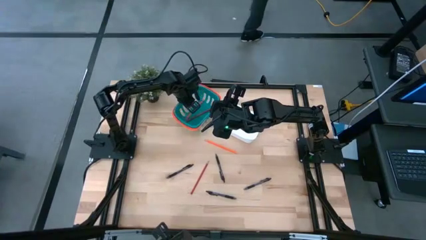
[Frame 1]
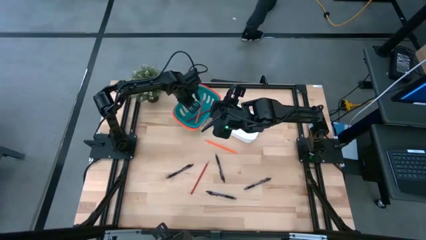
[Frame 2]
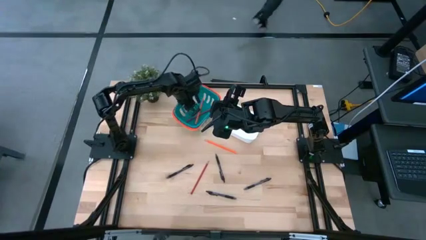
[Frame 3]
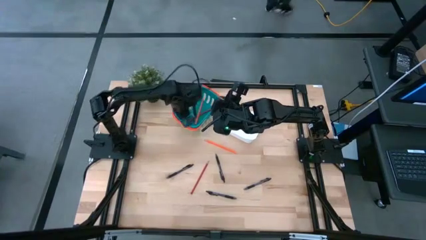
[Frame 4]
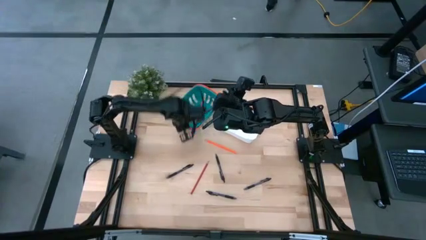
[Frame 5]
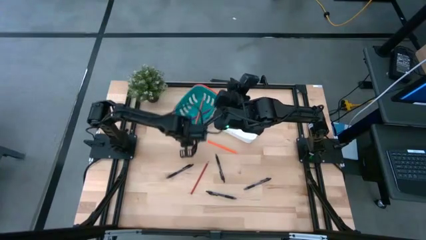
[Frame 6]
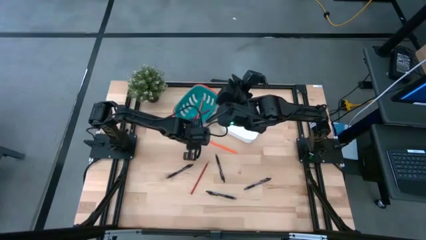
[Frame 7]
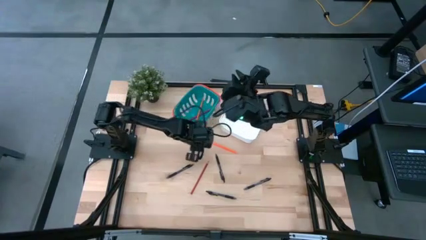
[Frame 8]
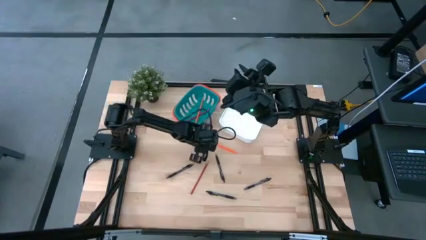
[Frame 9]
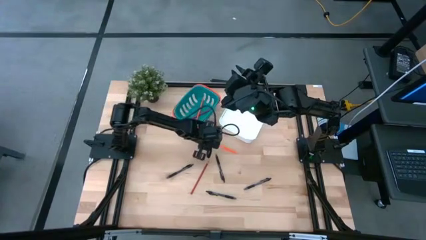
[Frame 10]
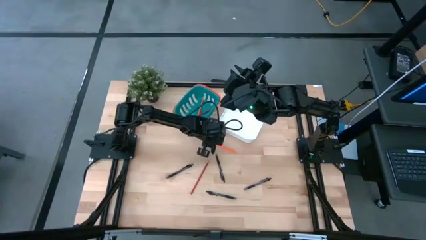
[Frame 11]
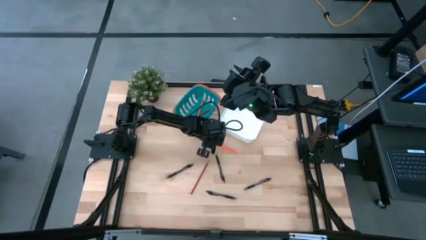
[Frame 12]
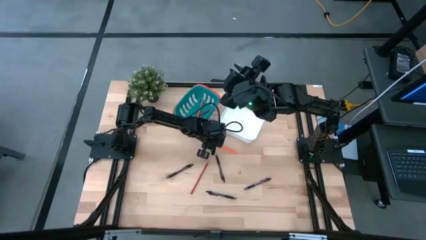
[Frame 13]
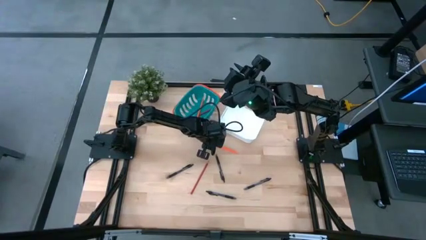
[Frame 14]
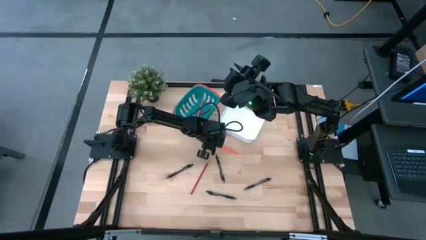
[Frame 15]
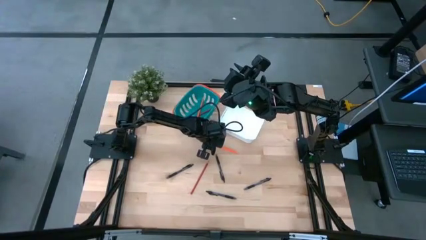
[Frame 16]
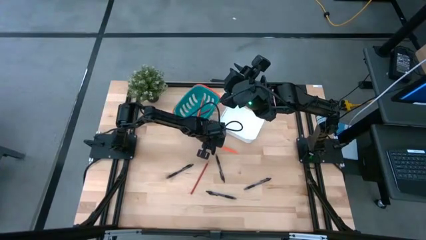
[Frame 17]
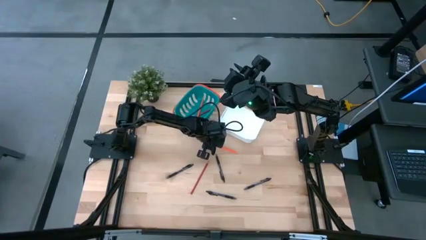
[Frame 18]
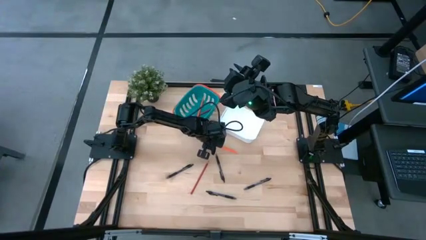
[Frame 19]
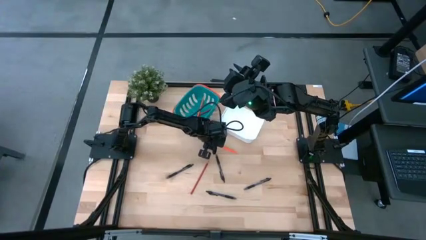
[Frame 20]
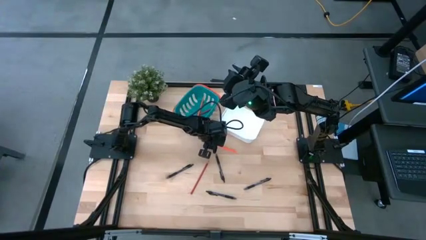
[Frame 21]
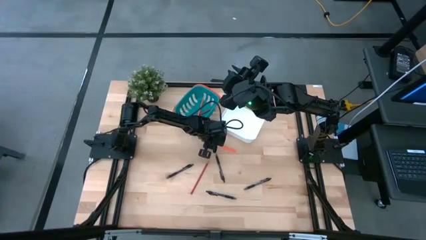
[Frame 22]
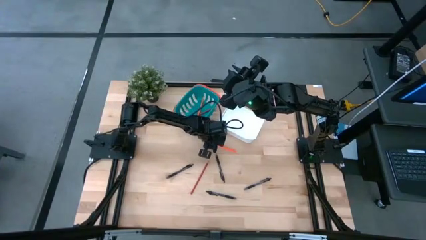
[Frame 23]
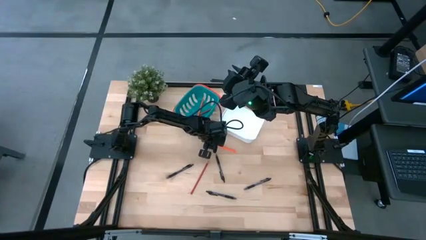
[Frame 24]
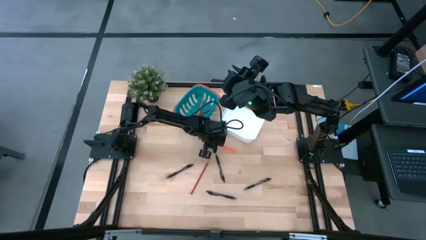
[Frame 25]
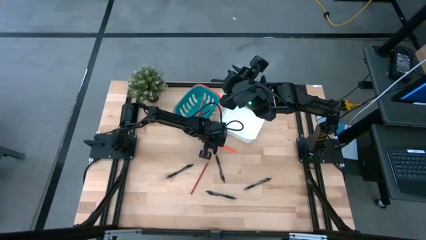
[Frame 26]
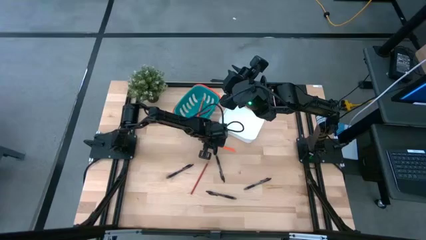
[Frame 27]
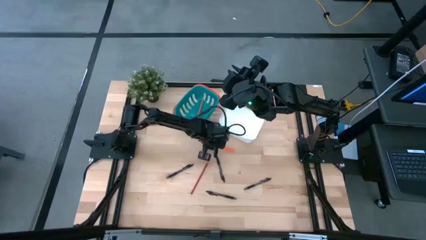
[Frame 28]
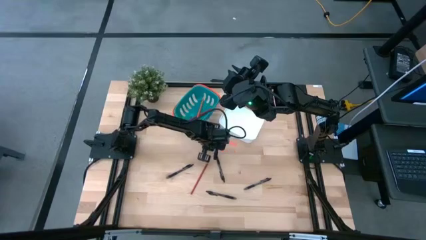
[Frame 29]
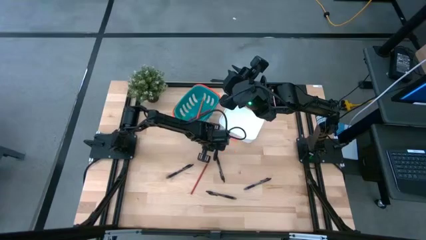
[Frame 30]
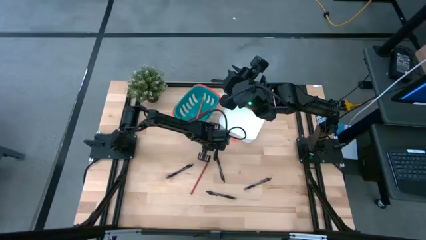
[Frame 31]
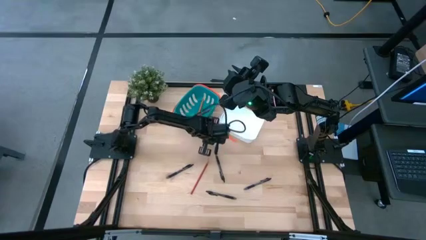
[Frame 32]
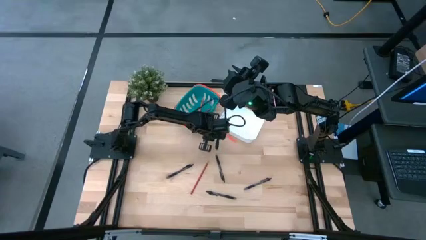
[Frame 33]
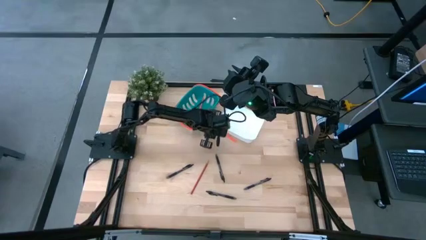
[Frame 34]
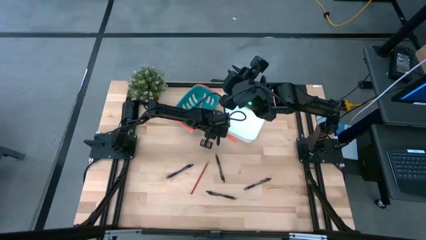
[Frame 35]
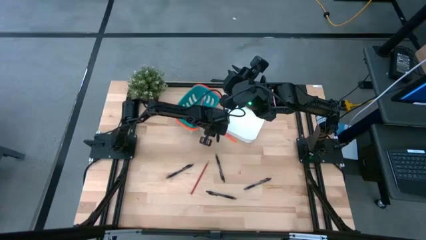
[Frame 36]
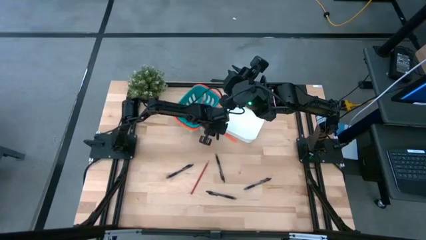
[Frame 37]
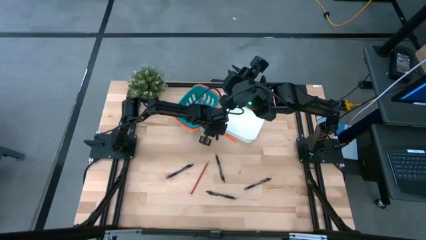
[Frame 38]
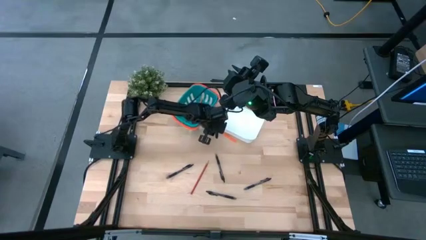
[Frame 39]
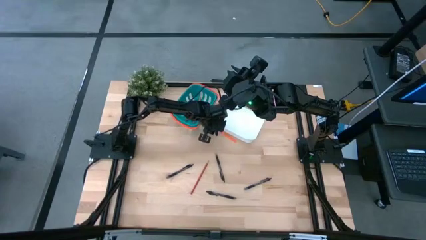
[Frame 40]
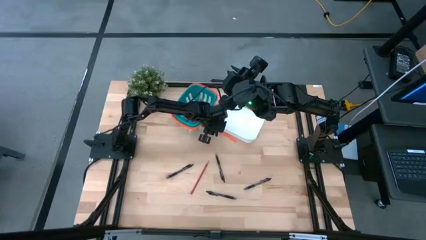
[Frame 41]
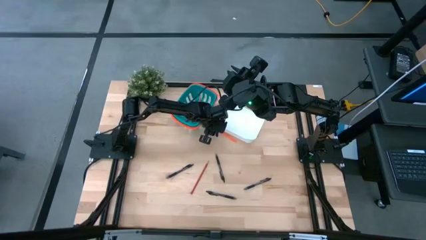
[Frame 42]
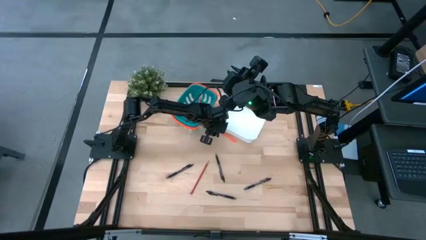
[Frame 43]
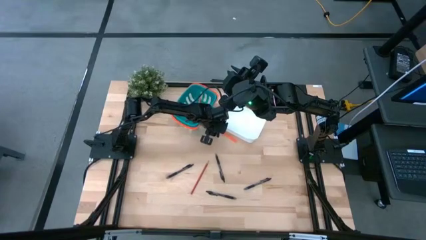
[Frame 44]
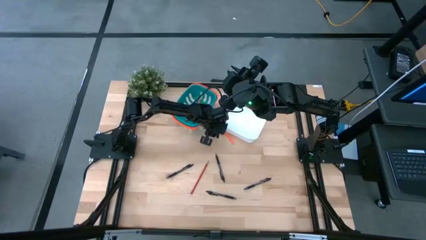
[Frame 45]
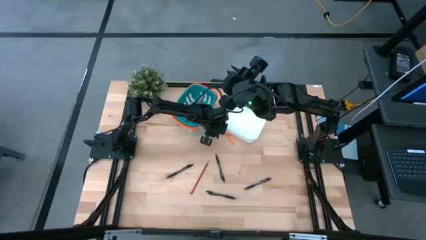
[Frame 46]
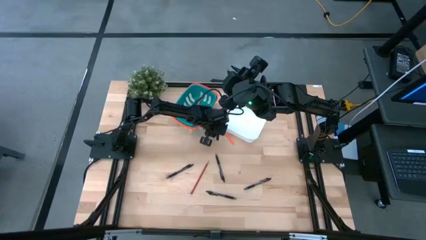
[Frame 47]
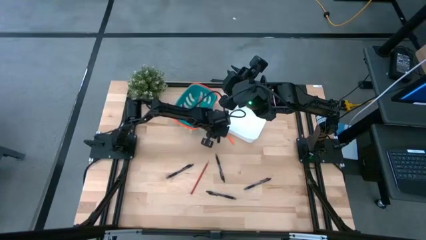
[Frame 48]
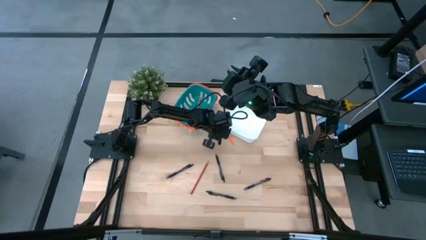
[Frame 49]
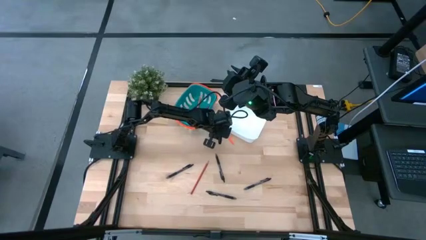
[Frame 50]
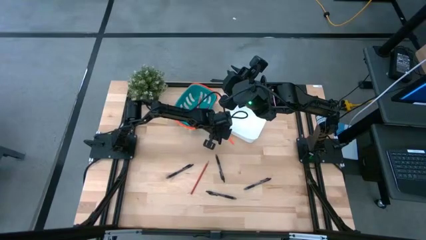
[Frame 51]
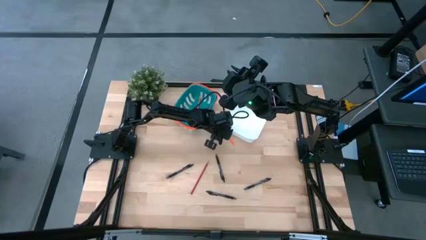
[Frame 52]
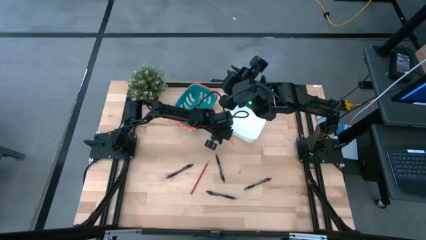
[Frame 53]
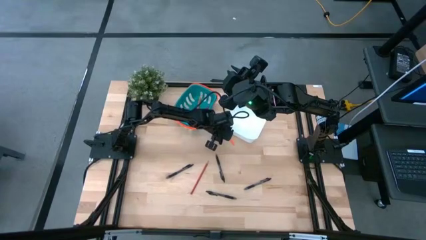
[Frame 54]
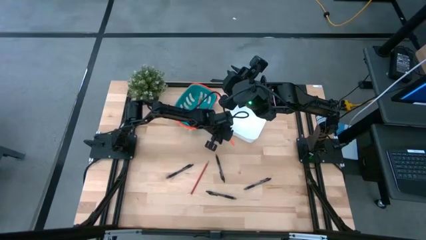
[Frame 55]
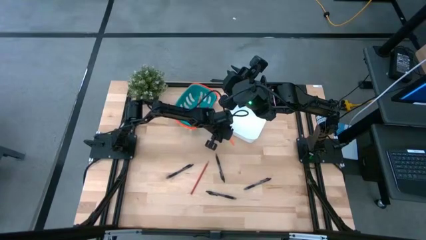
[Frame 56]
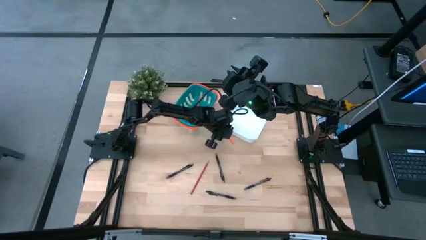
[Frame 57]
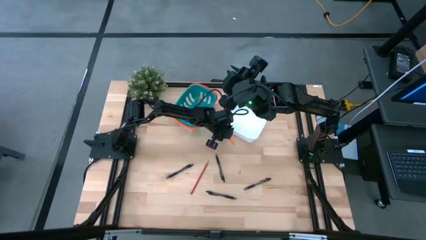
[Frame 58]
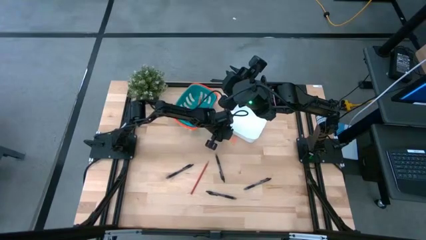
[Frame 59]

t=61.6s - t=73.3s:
Task: Sort pens & pencils
Put the orange pencil into the blue bin

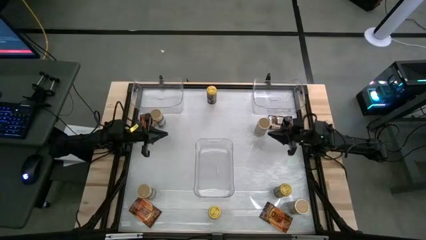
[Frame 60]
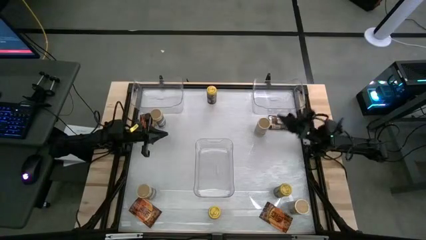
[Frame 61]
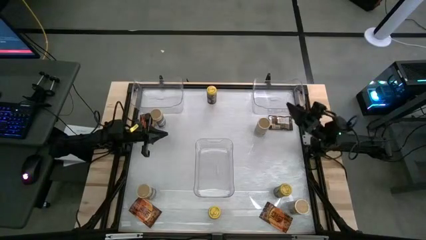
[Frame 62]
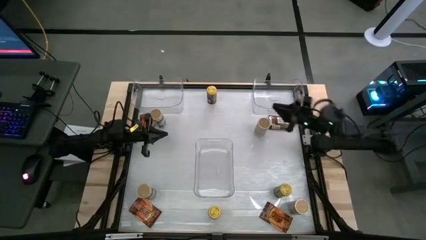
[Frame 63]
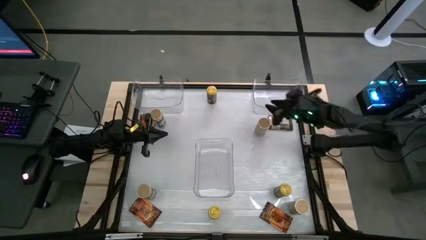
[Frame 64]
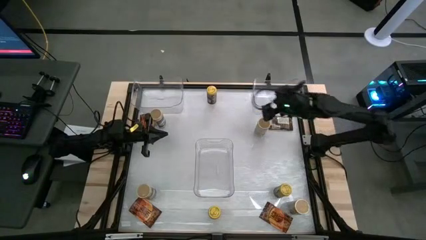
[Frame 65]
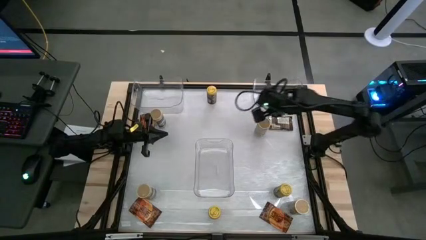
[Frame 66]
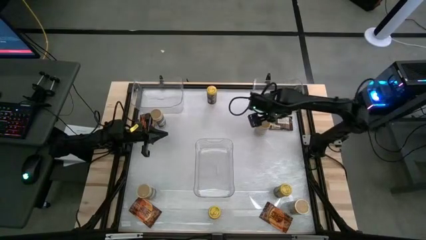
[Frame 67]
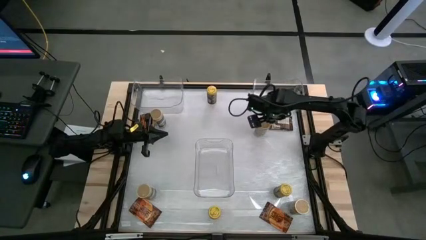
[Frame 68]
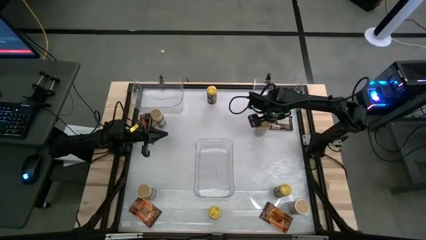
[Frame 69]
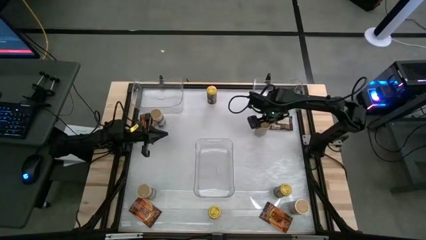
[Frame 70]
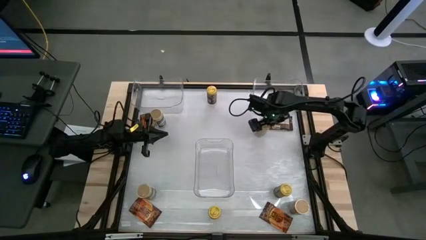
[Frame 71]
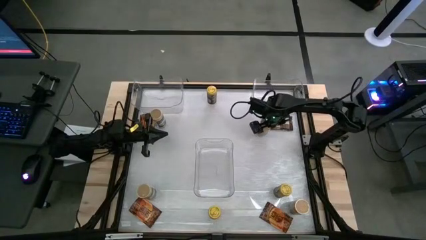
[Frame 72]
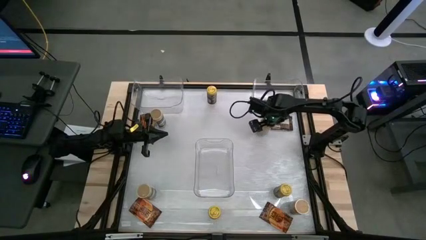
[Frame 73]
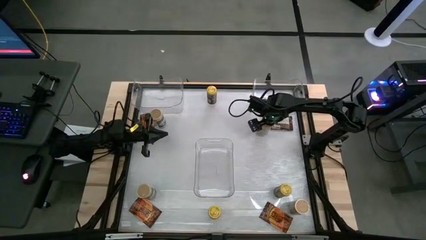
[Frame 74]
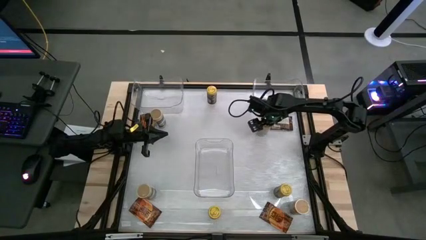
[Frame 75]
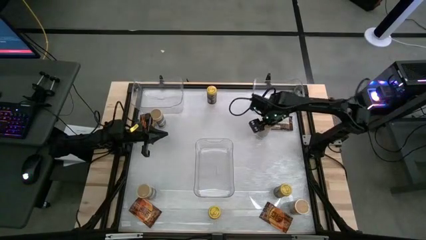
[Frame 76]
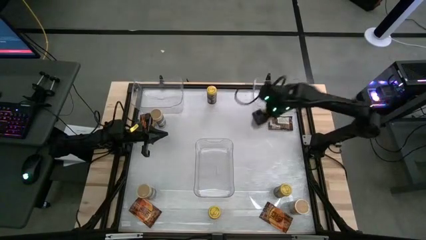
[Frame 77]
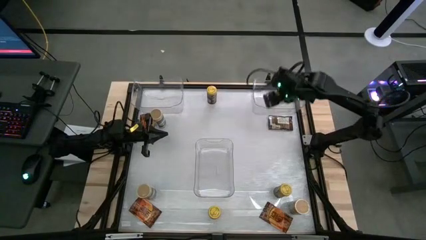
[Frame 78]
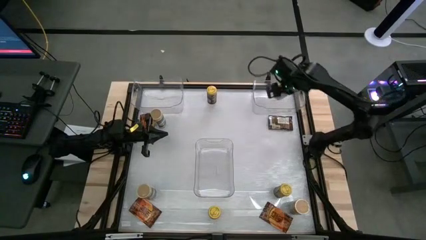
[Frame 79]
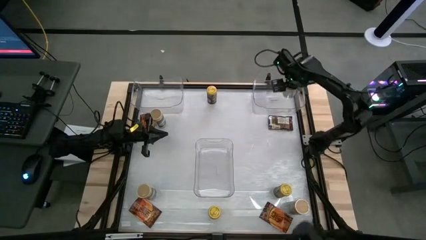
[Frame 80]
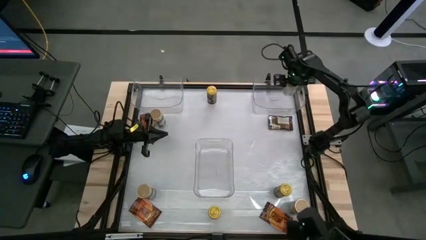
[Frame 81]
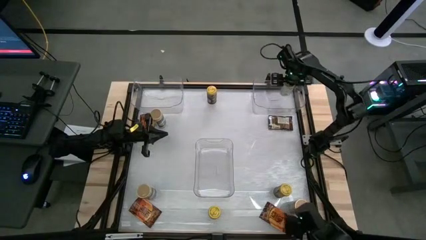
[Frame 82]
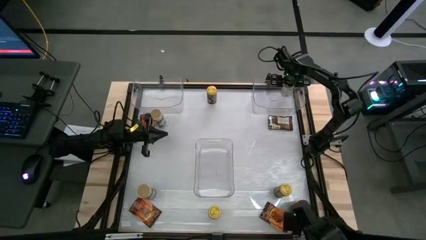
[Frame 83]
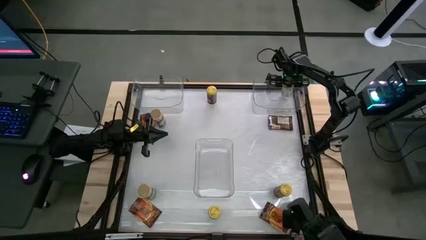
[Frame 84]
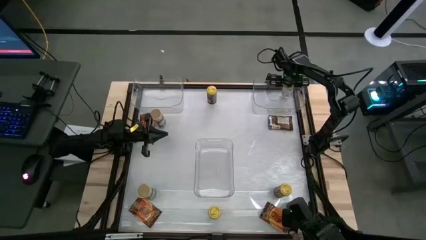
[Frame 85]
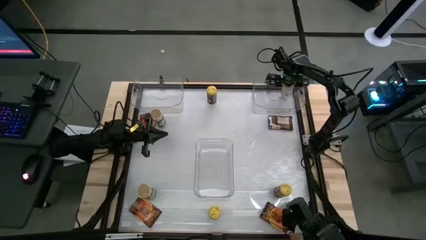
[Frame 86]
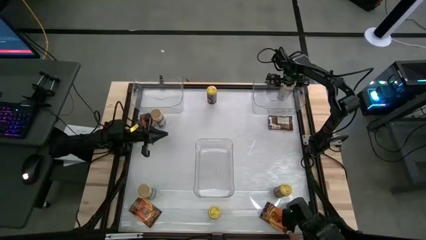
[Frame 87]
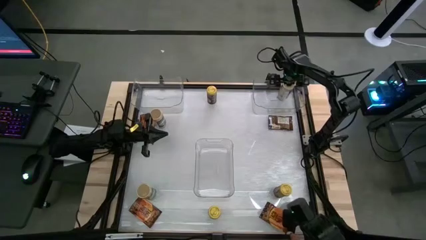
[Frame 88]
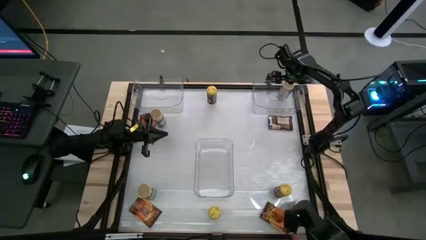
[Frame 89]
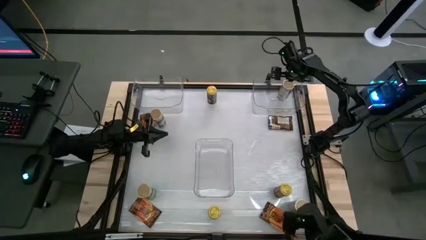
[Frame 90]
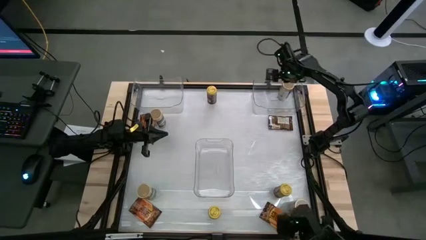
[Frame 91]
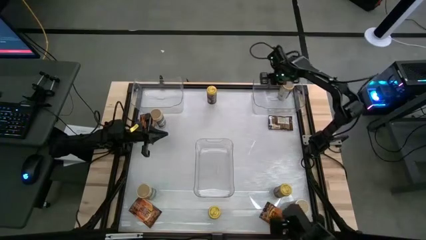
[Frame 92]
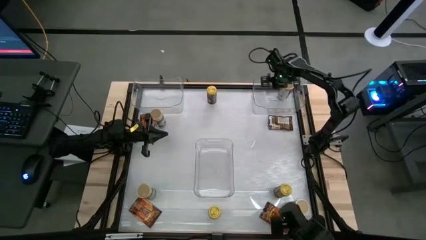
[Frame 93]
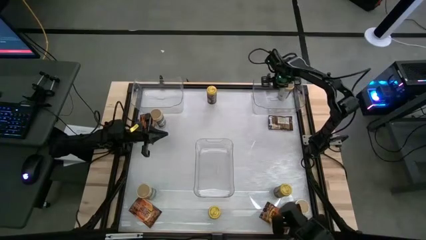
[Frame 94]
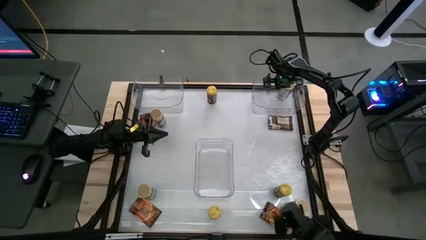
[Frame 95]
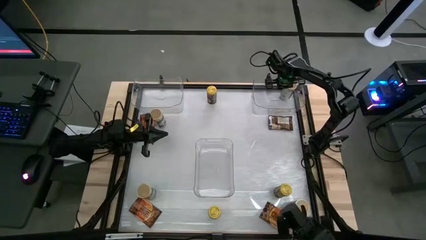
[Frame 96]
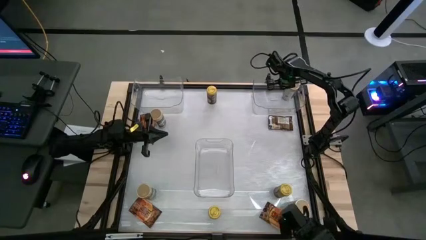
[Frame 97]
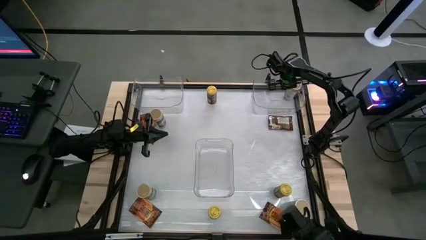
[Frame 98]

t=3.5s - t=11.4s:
Task: Sort spices by type
Put the top right brown seasoning bottle into the right transparent bin
